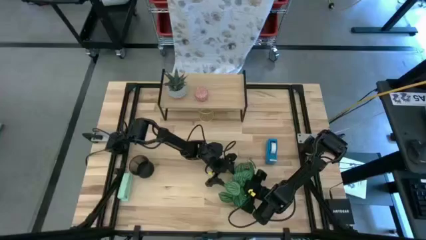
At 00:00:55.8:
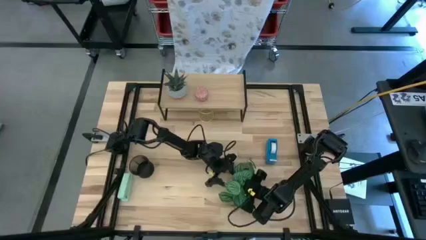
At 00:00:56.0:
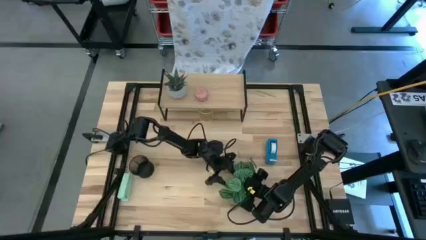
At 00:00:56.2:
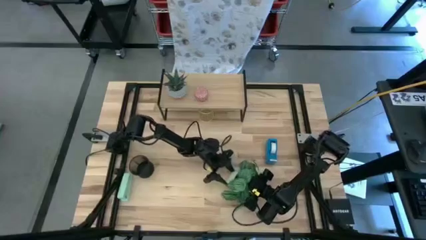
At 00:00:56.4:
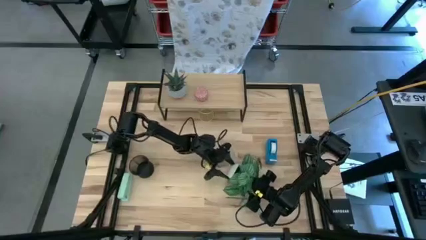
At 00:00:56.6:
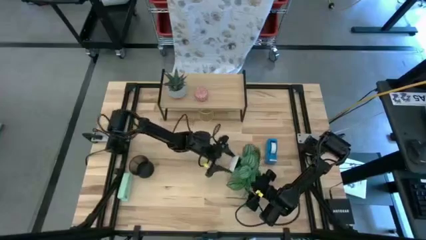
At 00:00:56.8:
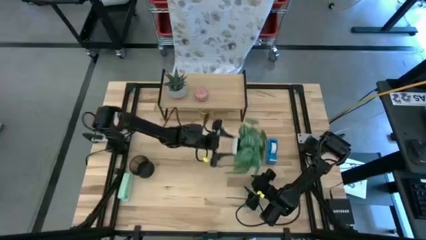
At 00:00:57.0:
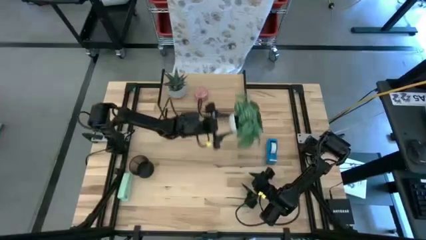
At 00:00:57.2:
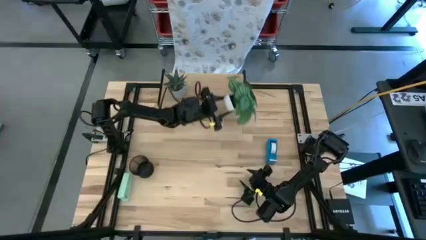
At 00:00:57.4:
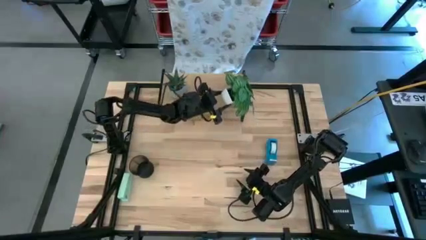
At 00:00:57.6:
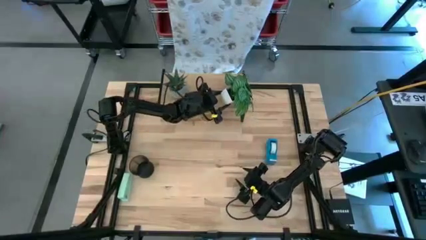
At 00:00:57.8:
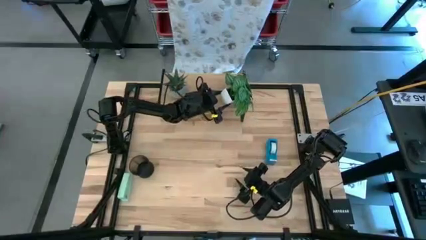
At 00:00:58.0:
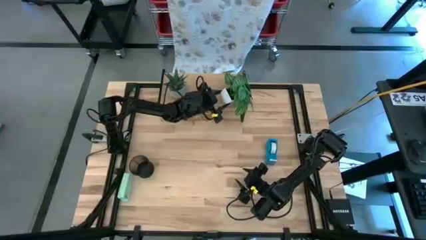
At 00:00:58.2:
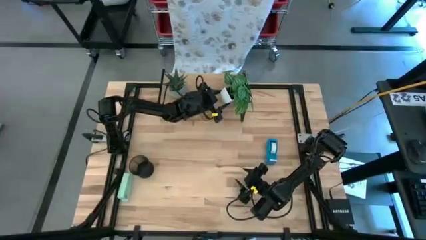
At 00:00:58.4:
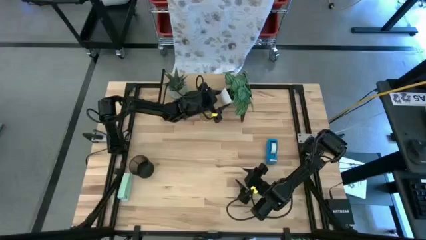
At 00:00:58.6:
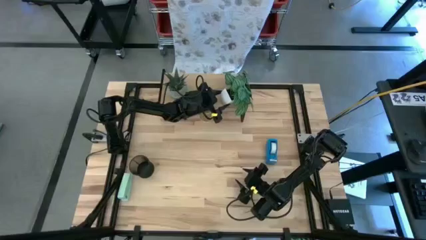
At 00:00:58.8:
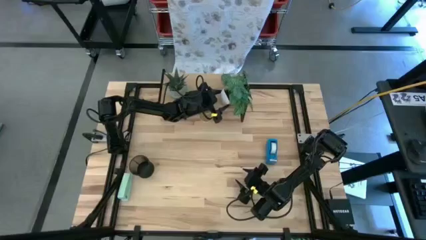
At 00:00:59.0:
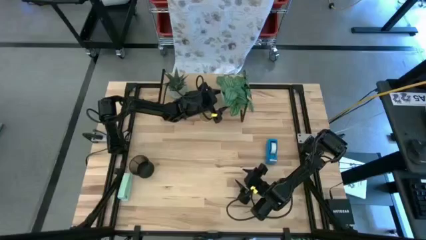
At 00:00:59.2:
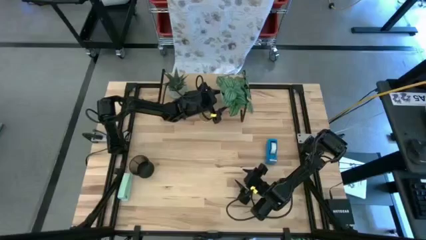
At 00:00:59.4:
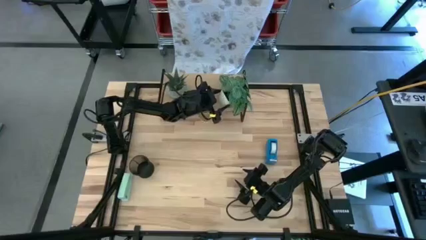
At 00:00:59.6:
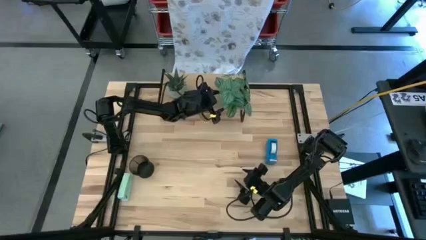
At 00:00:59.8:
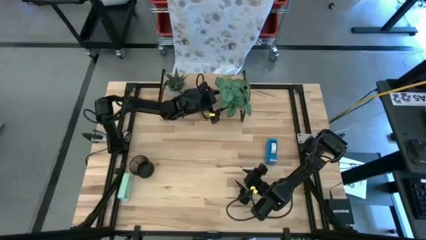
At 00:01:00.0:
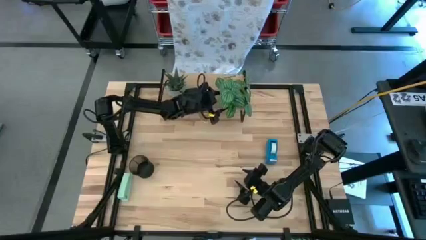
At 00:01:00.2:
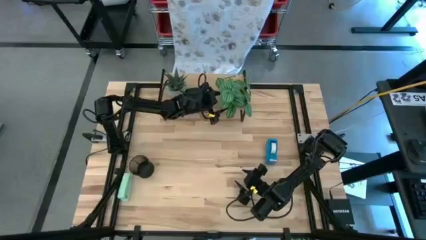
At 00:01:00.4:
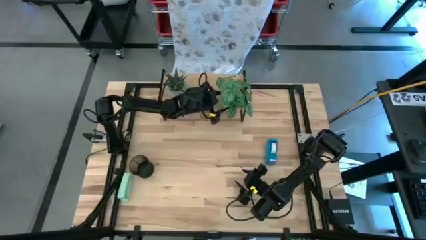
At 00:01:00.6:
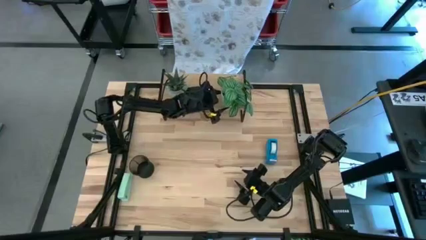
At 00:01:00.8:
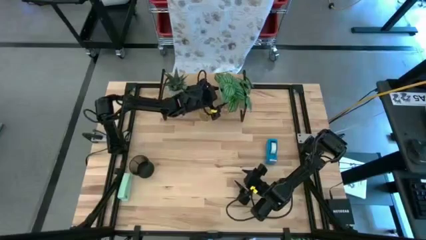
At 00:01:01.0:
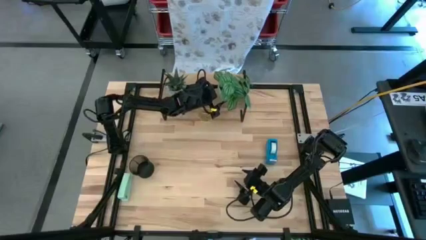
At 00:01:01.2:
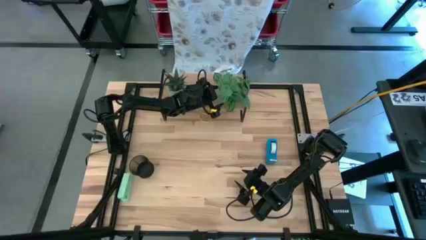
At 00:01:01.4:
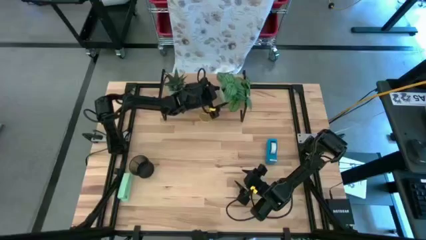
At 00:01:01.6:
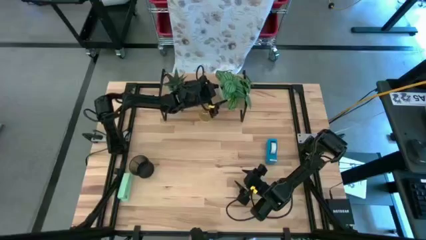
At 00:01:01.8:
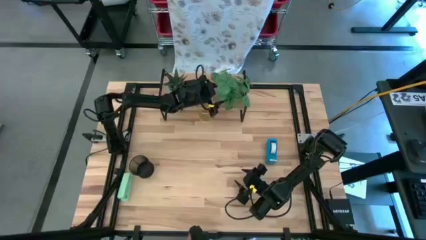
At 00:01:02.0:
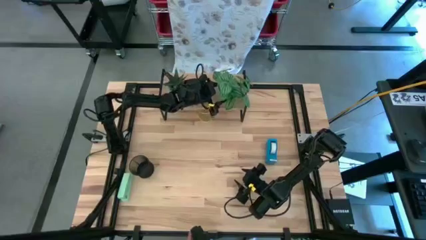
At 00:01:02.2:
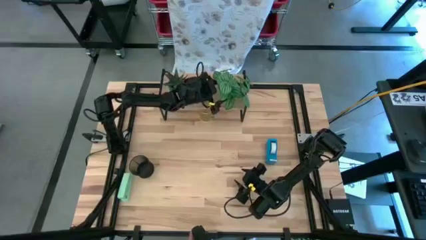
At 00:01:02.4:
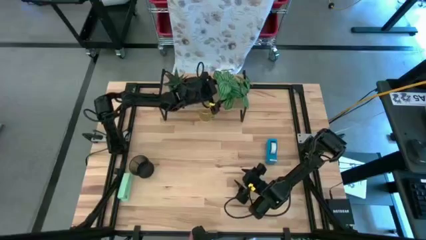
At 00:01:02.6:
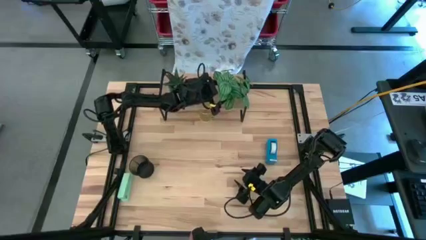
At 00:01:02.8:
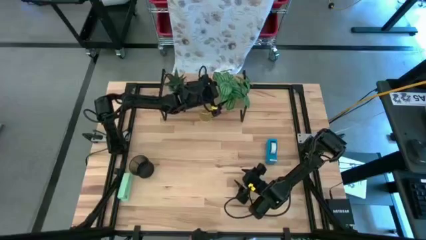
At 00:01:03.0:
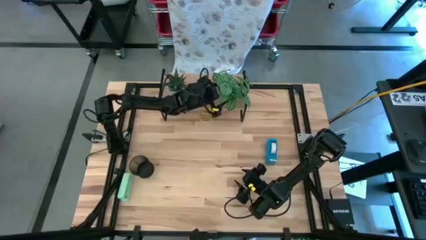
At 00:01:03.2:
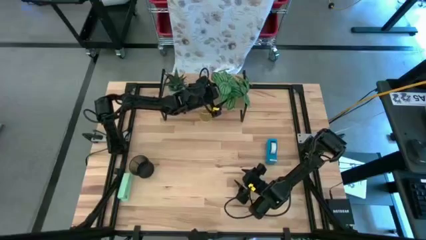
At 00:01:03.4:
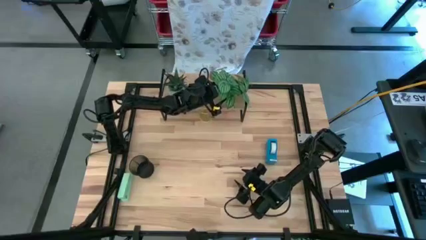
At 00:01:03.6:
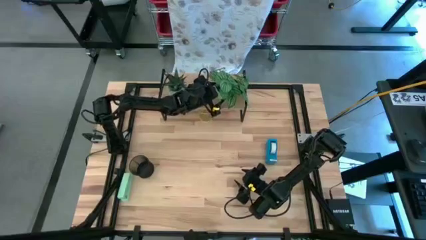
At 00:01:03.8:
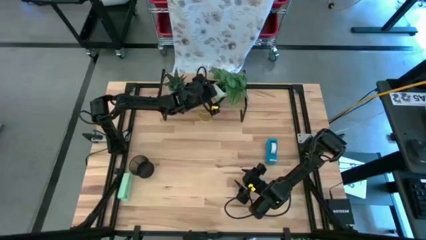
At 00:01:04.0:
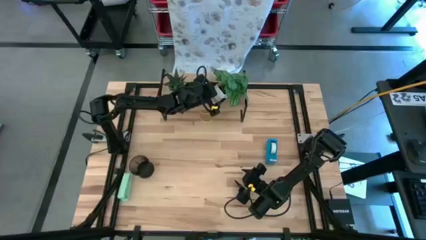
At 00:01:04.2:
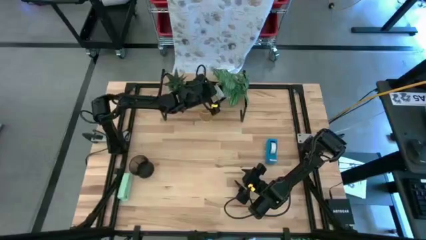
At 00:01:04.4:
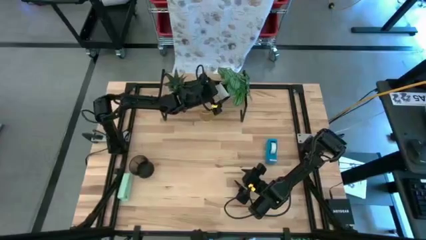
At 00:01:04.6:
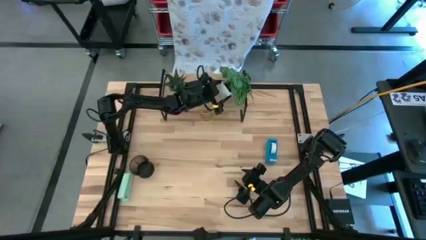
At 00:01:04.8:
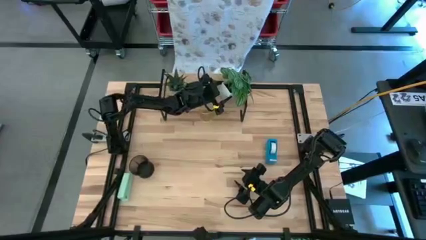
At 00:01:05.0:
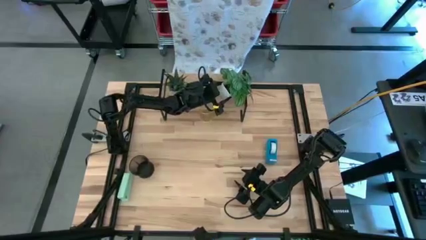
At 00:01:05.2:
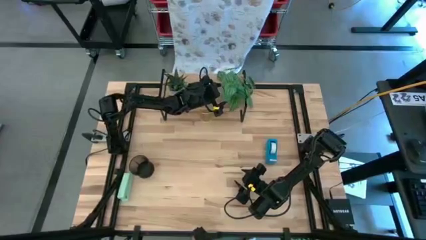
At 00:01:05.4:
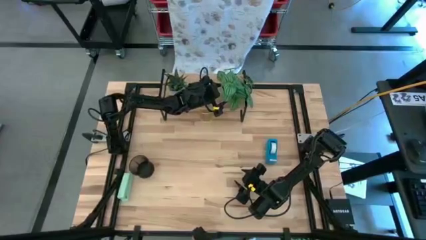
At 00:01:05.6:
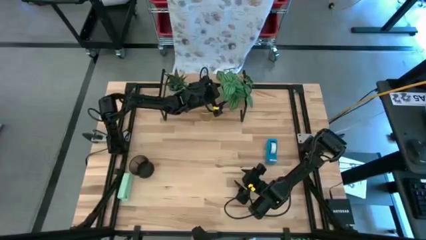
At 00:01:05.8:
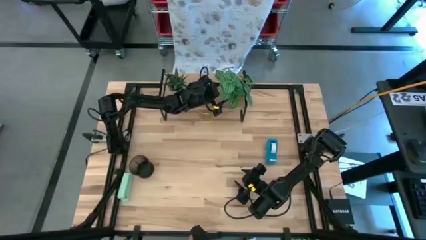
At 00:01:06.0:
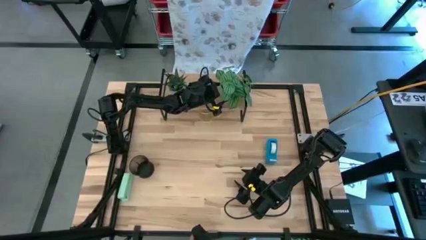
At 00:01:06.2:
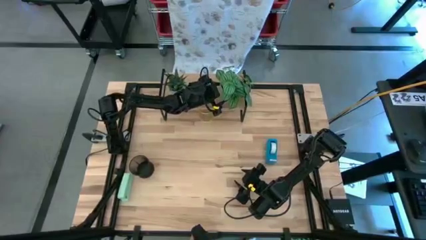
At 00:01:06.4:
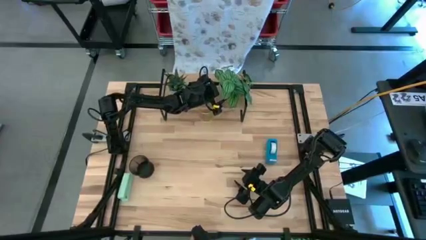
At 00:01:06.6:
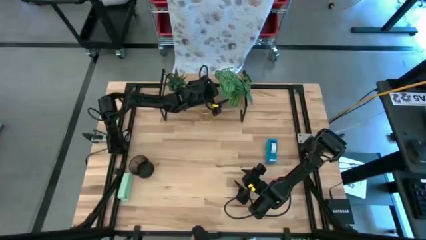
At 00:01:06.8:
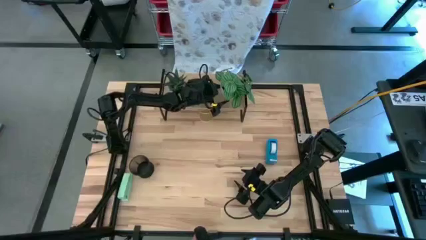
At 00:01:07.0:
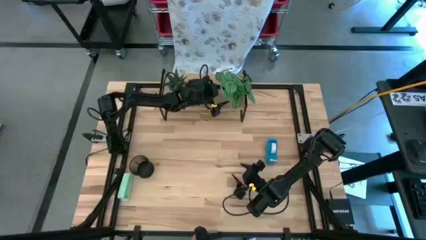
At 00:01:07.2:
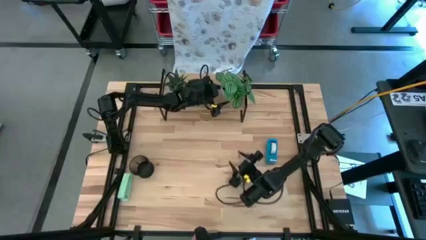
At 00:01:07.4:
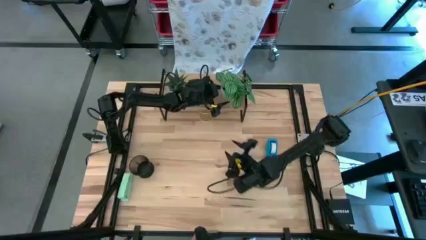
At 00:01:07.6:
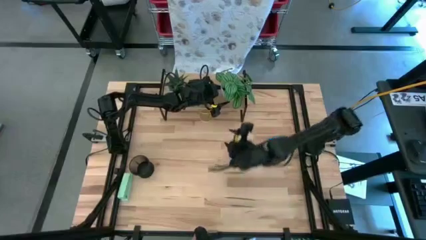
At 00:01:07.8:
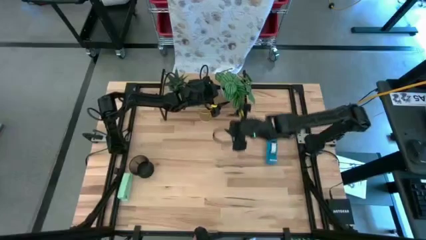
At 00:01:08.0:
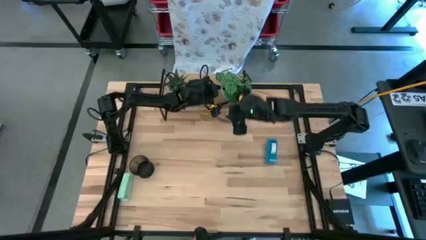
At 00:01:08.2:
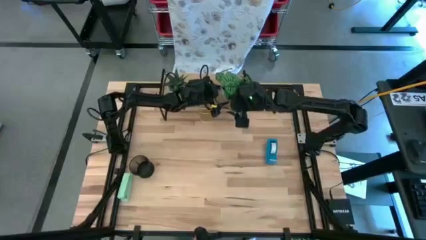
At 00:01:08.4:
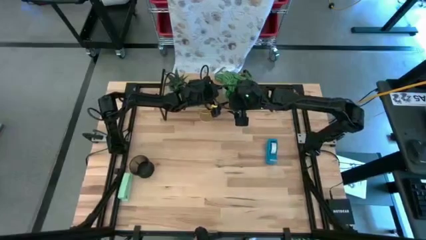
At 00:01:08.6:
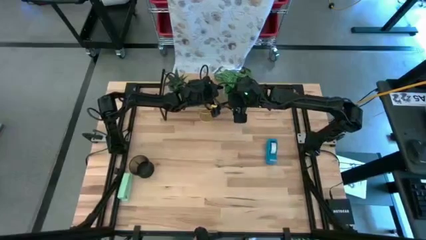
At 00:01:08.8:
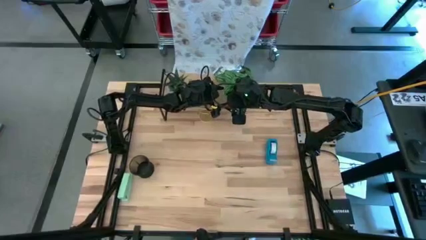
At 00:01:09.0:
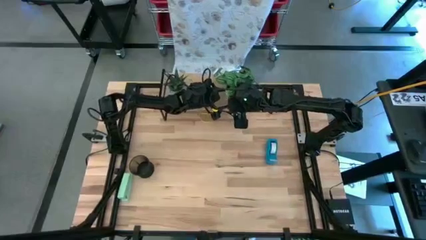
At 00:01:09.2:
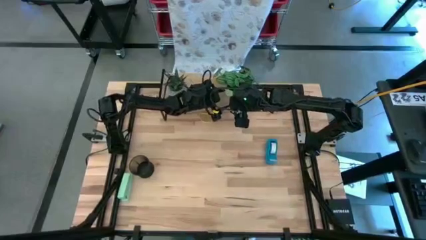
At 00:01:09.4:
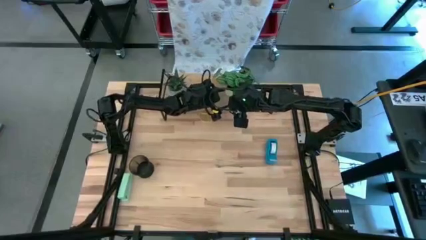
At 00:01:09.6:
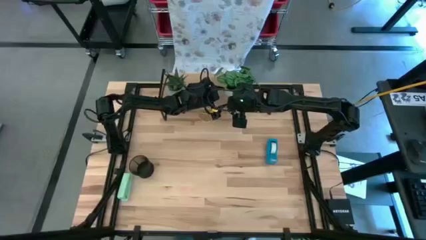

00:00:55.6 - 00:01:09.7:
Task: Stock shelves
Put the potted plant on the shelf
